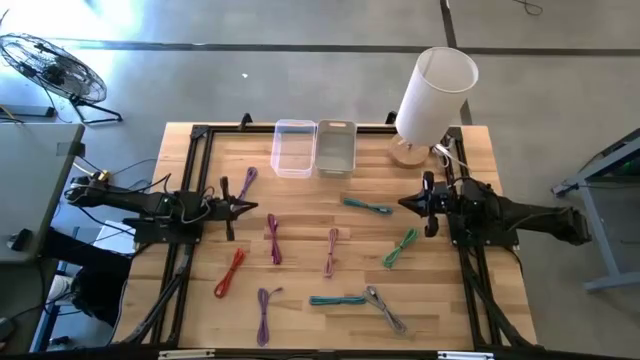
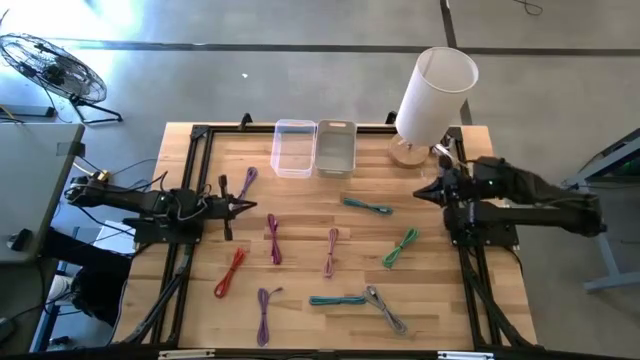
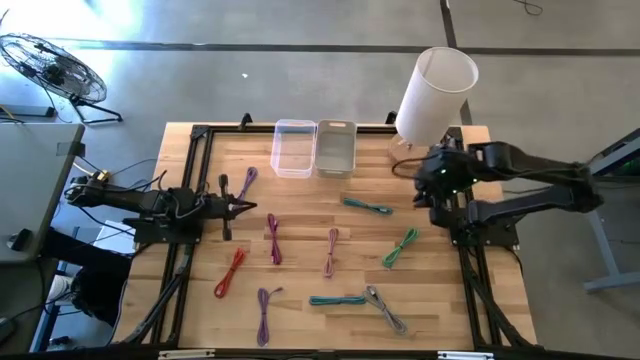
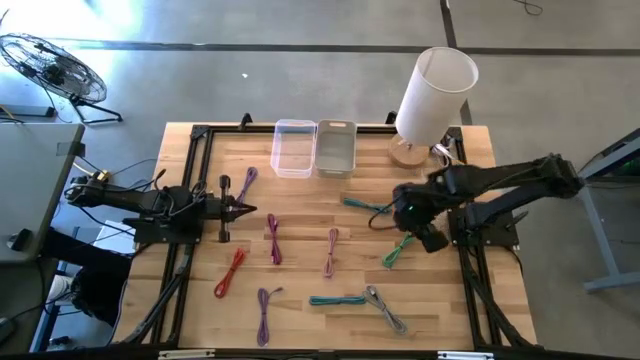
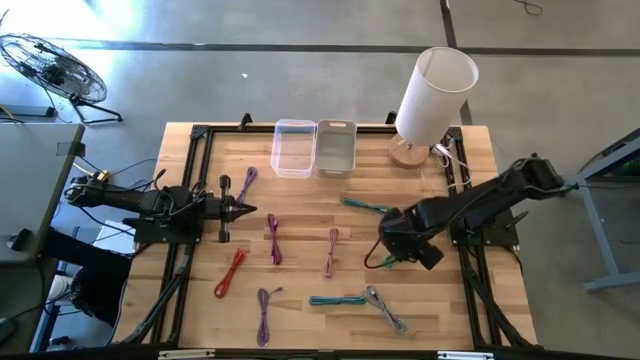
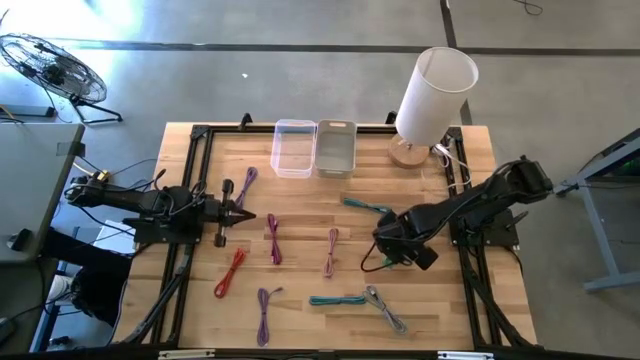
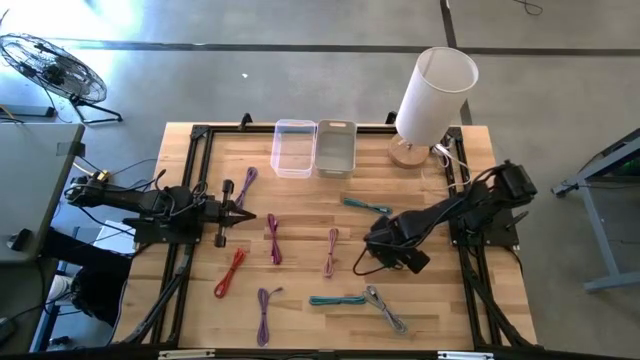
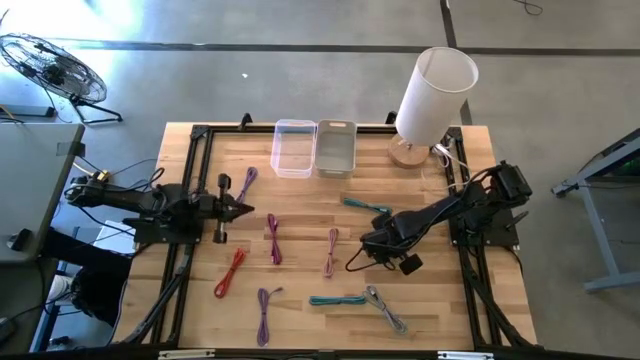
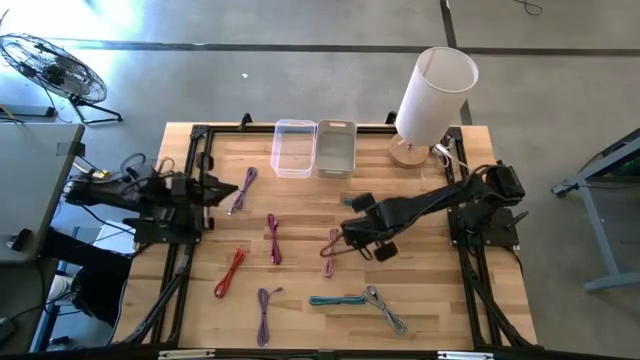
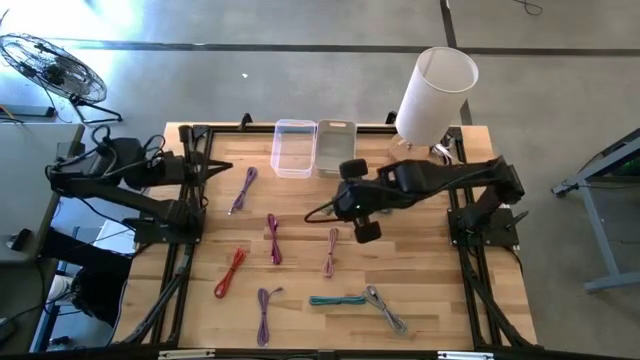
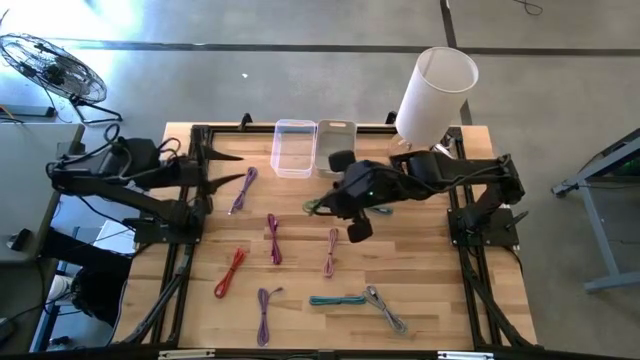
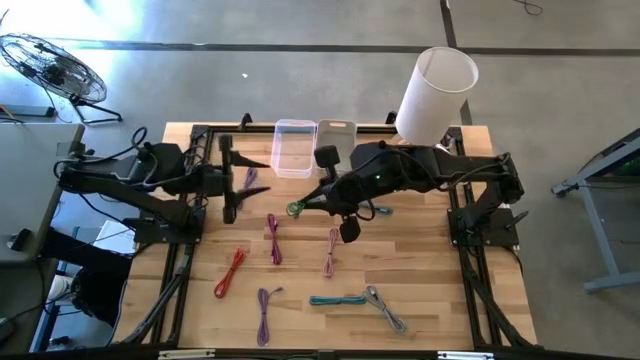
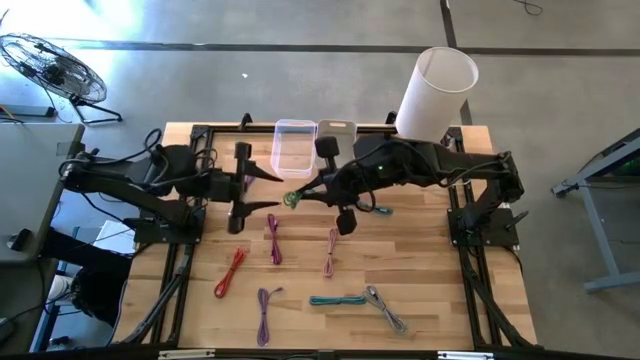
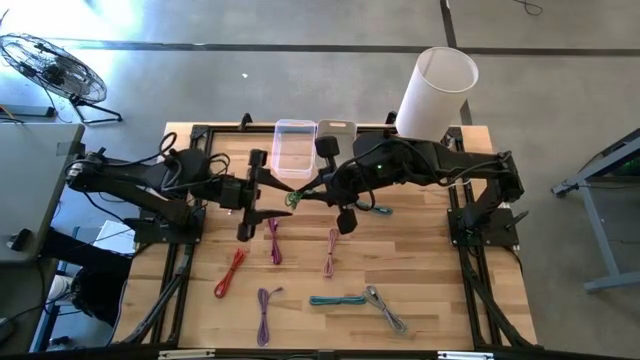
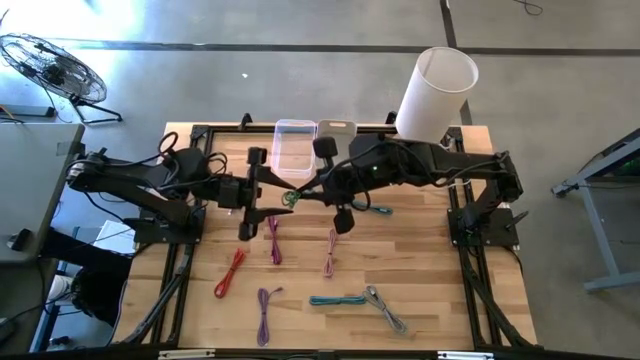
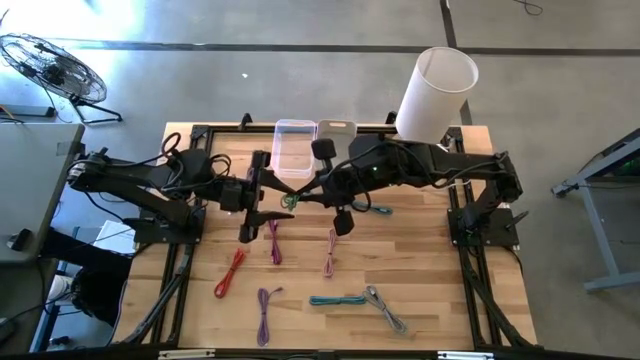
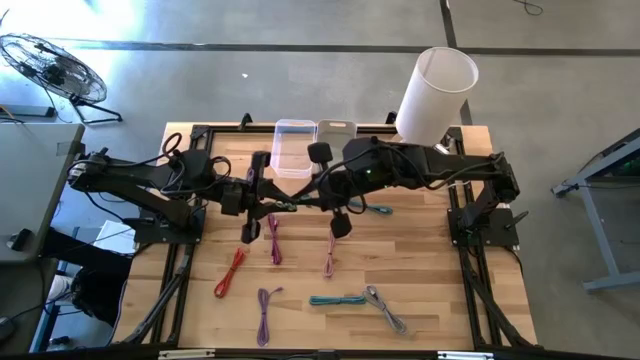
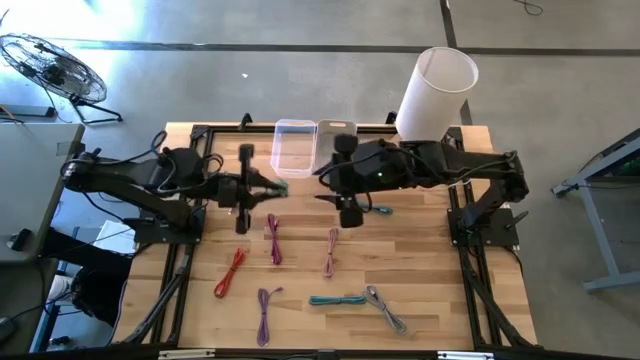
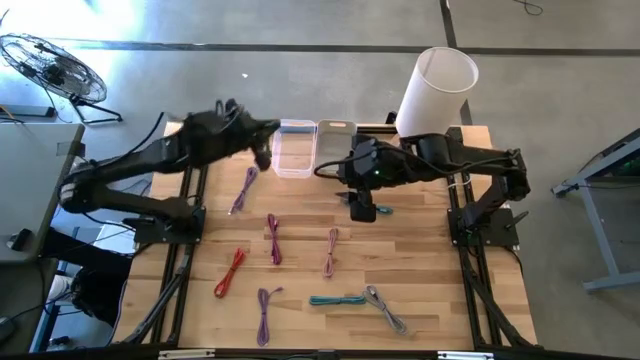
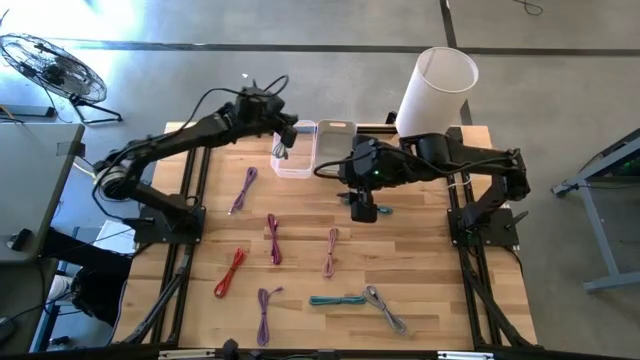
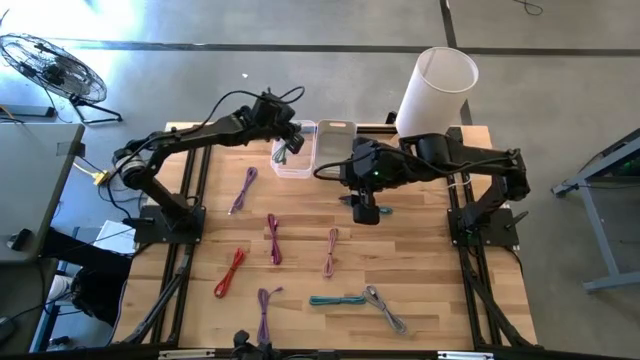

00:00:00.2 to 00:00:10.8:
Task: Pick & Place USB Port
Put the green charger cable into the transparent bin

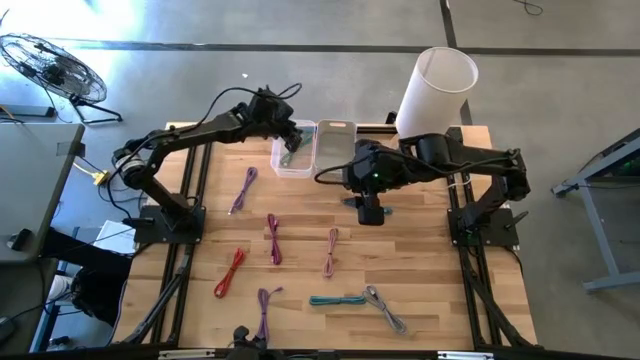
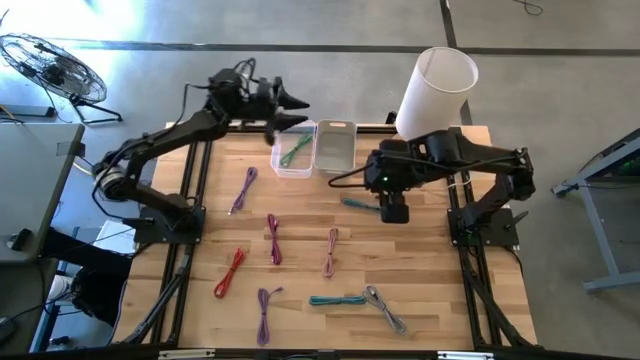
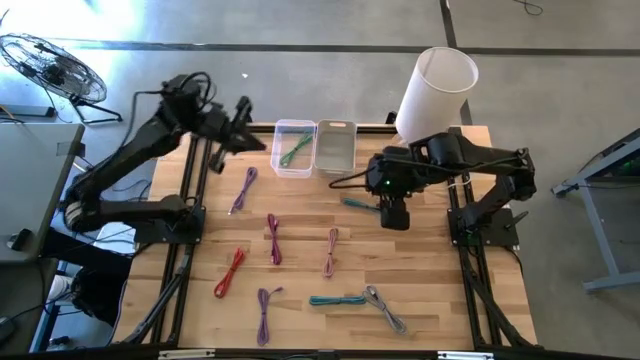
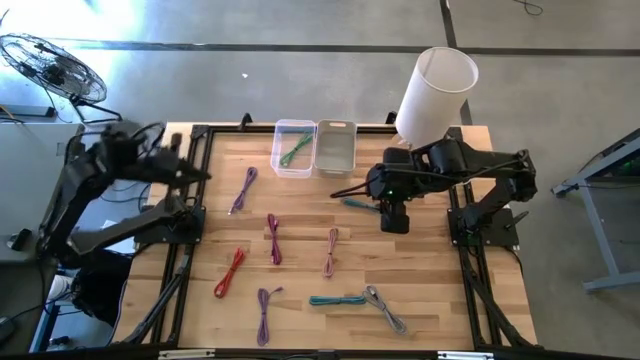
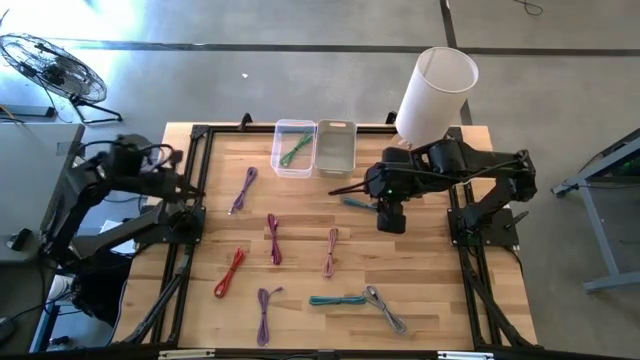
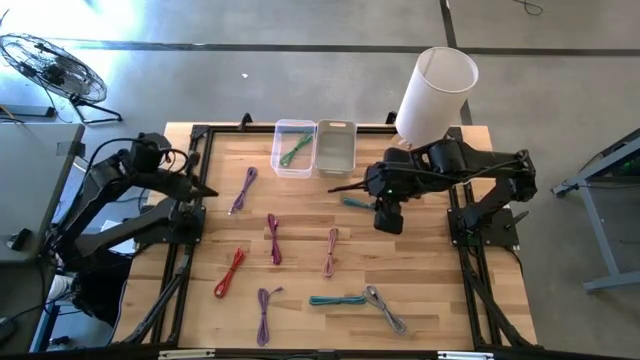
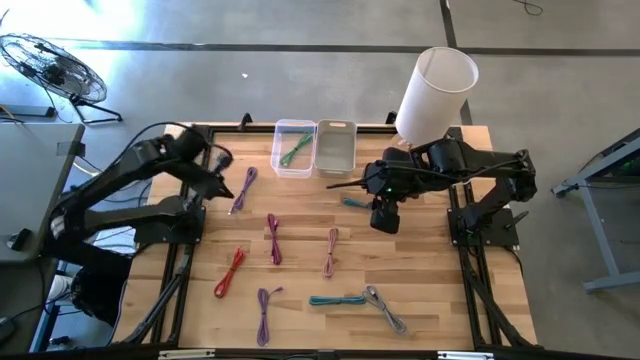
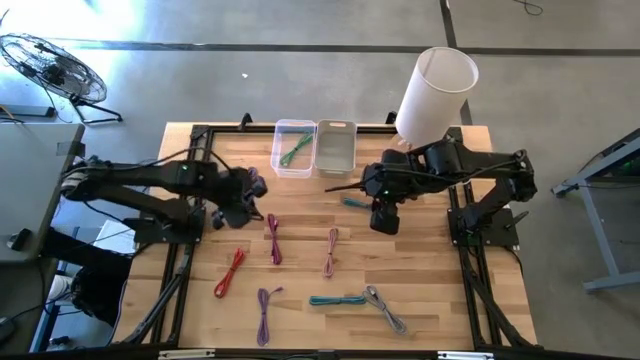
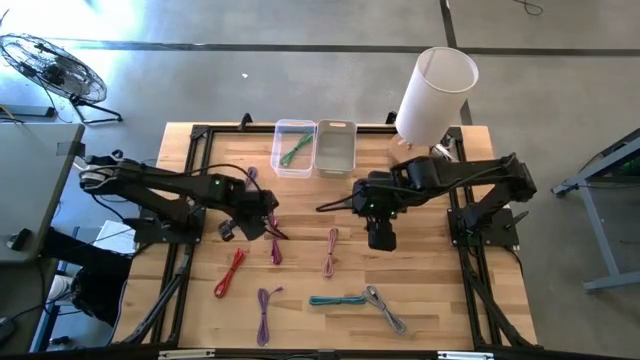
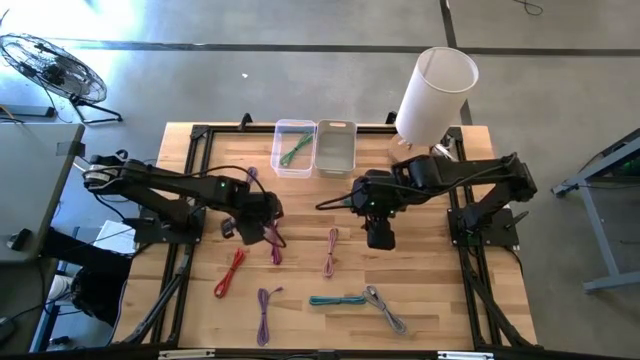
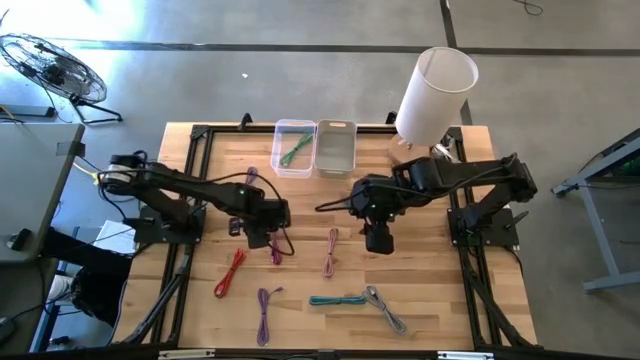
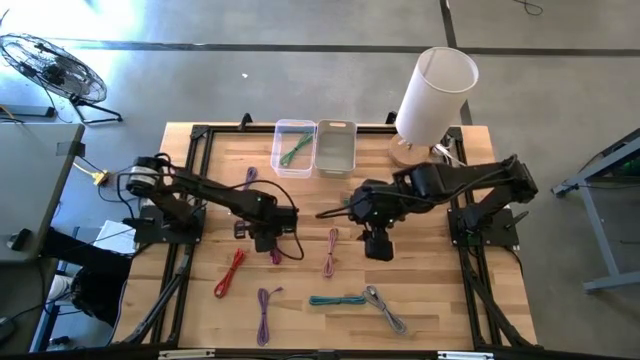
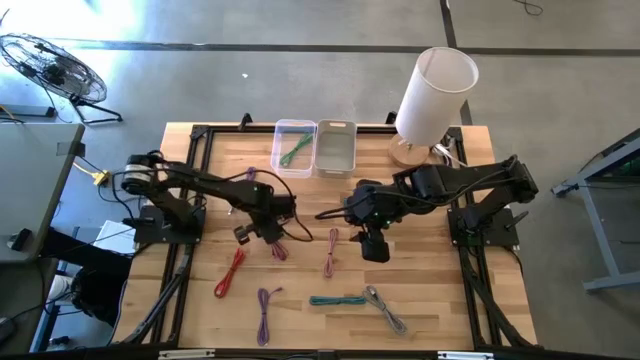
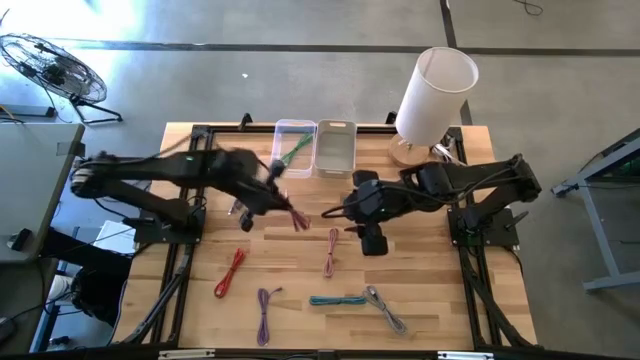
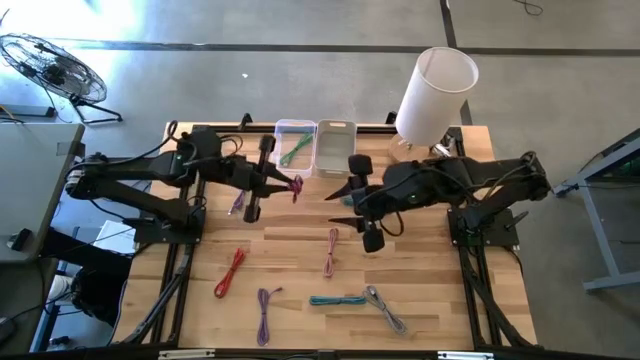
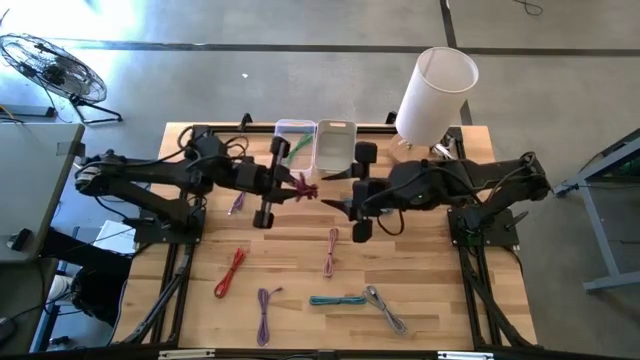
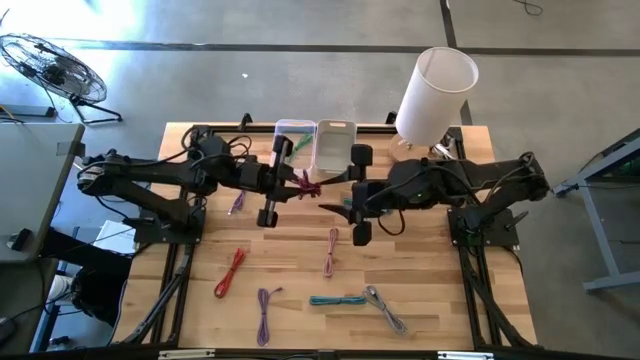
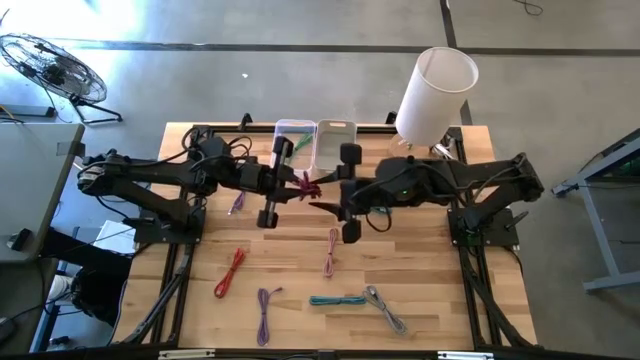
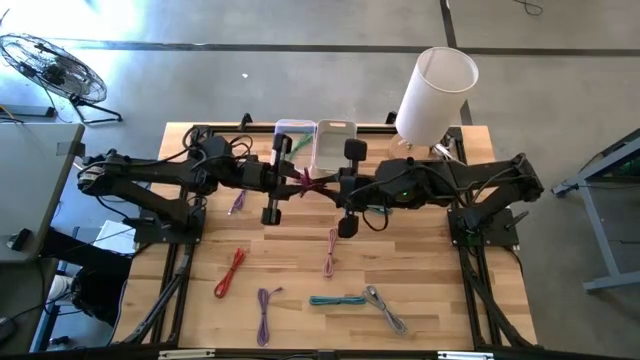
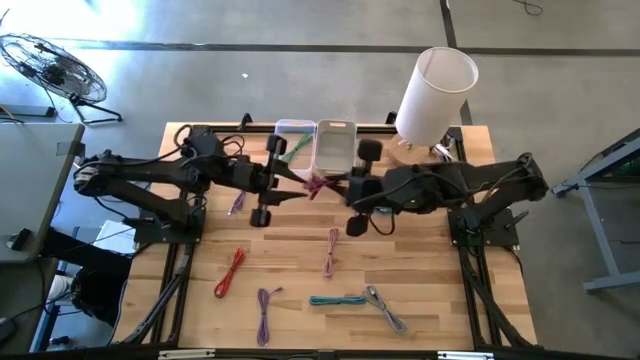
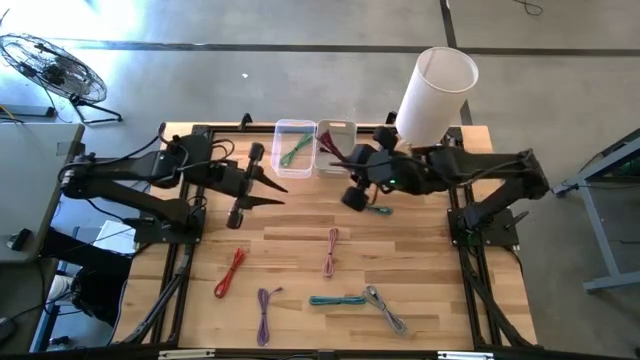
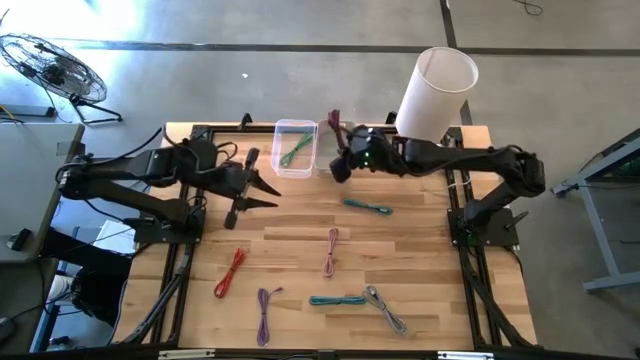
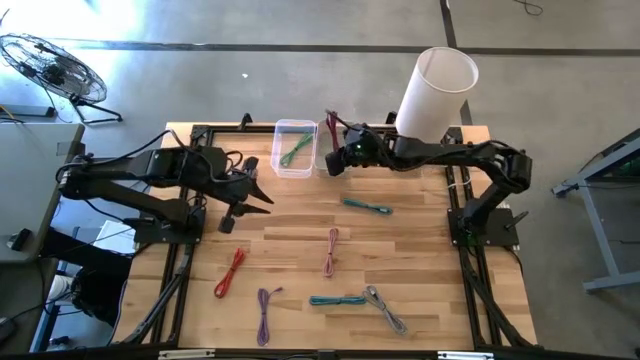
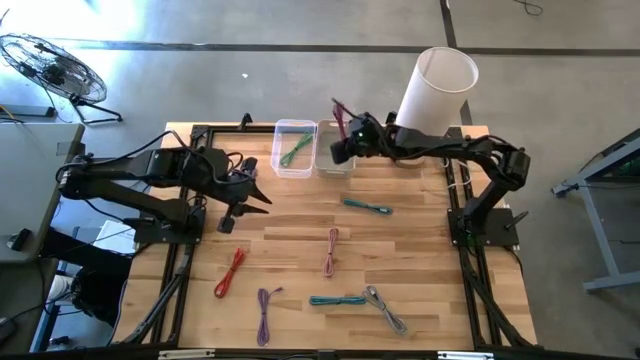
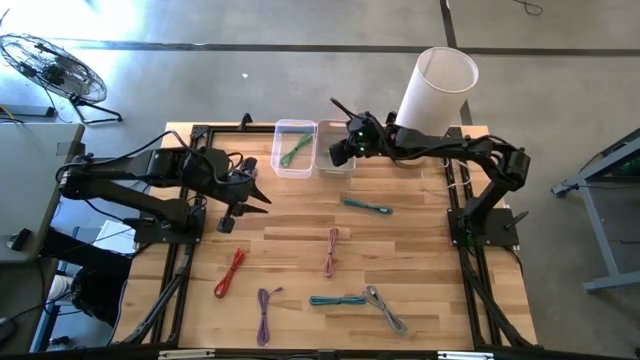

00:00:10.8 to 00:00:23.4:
Put the black and pink charger cable into the gray bin
